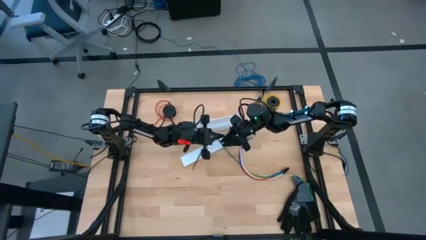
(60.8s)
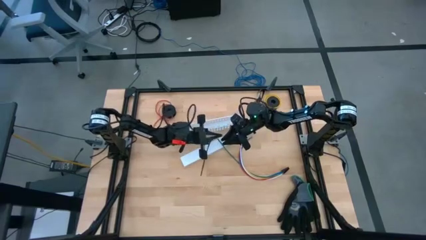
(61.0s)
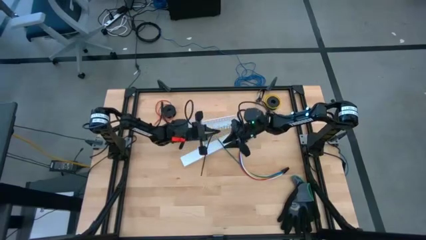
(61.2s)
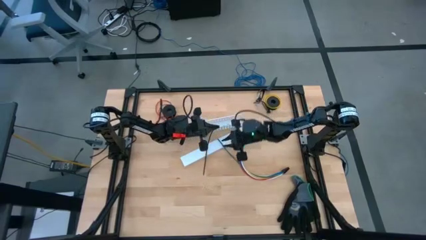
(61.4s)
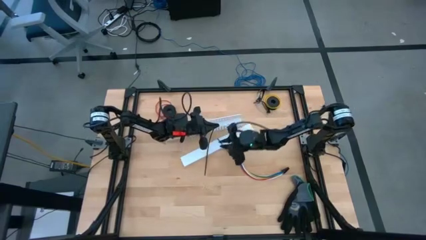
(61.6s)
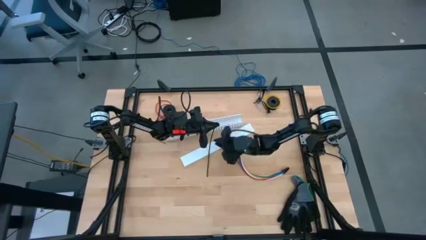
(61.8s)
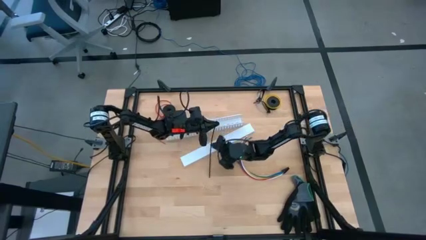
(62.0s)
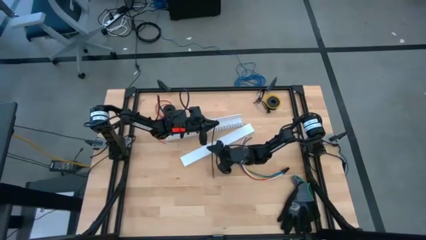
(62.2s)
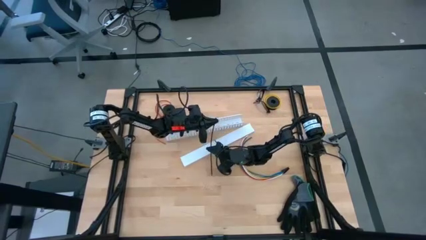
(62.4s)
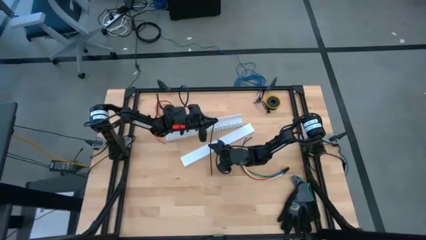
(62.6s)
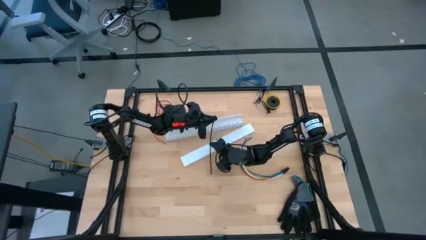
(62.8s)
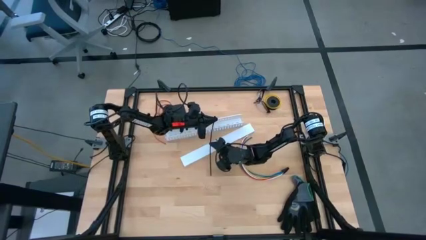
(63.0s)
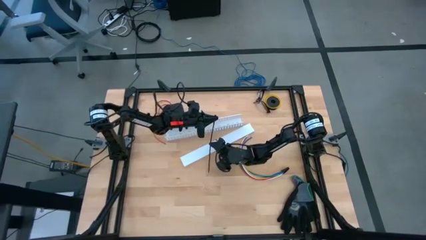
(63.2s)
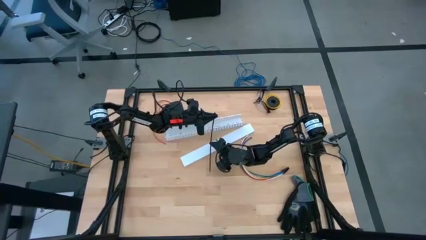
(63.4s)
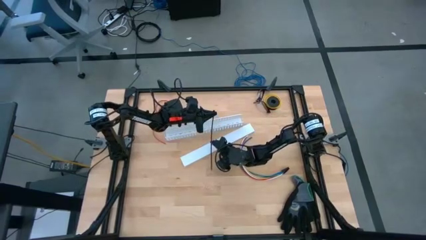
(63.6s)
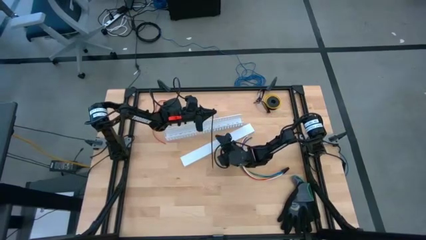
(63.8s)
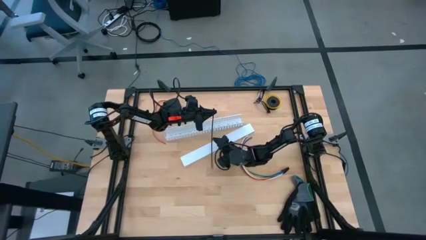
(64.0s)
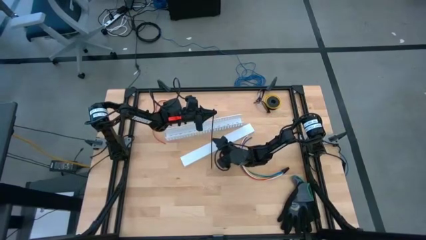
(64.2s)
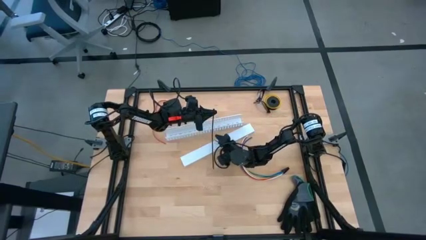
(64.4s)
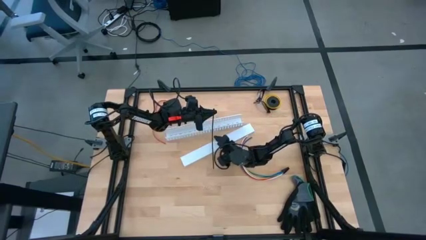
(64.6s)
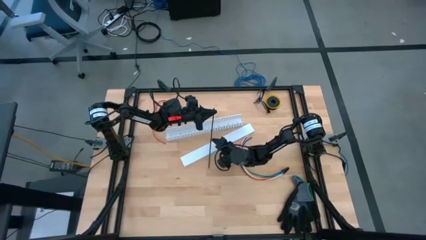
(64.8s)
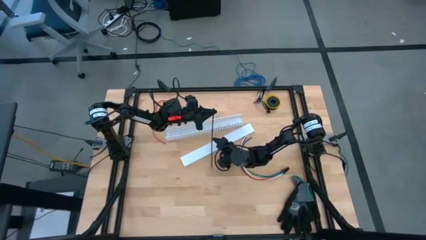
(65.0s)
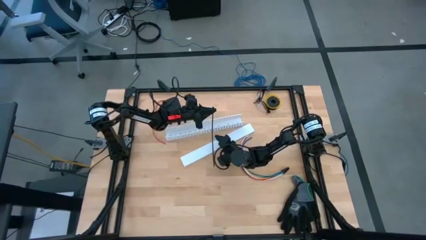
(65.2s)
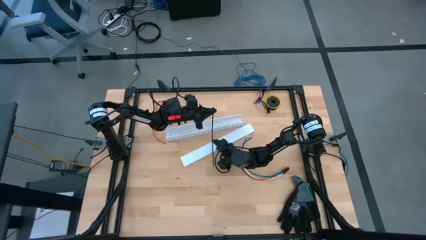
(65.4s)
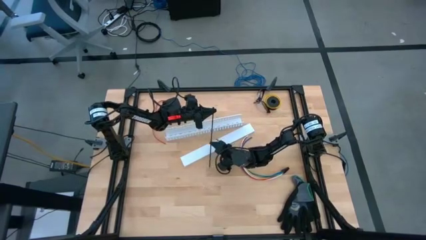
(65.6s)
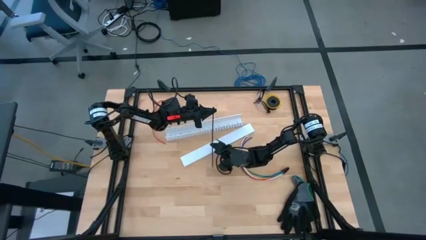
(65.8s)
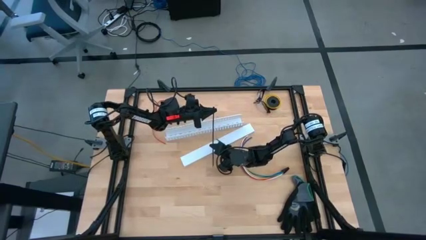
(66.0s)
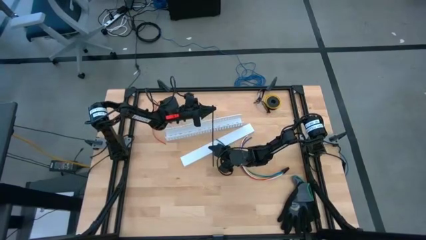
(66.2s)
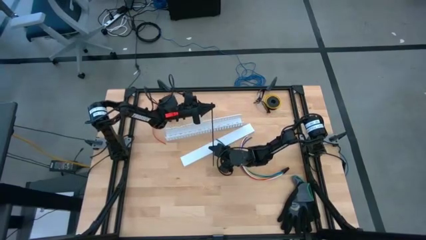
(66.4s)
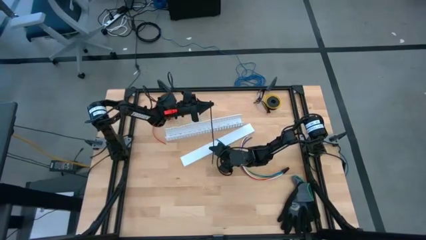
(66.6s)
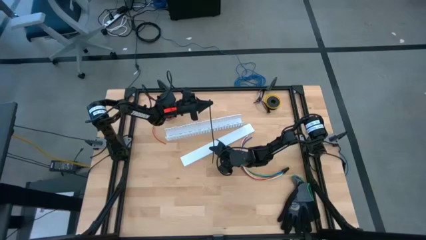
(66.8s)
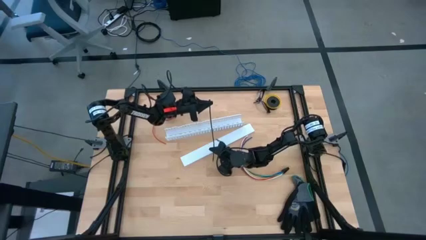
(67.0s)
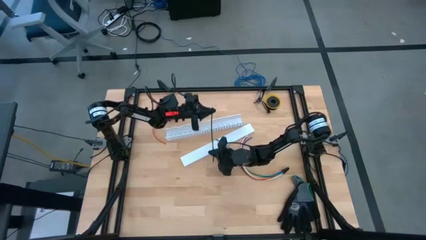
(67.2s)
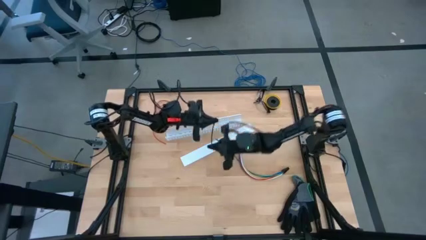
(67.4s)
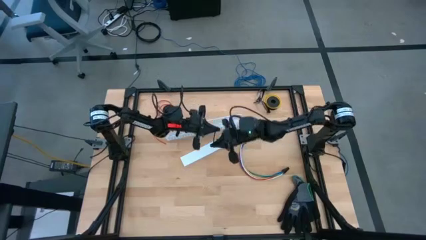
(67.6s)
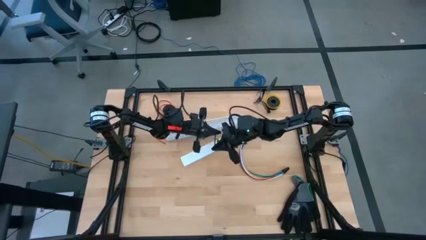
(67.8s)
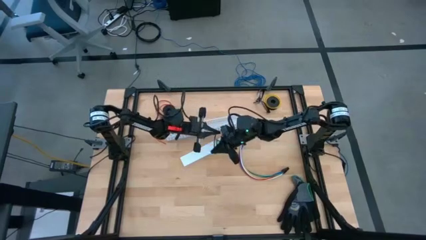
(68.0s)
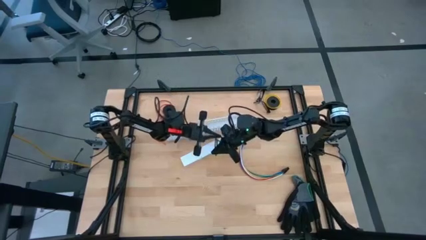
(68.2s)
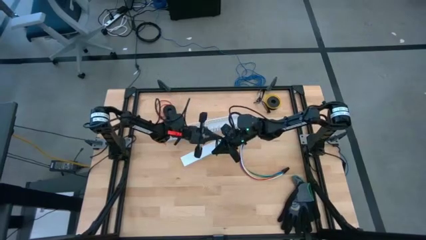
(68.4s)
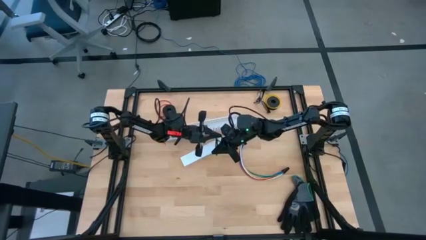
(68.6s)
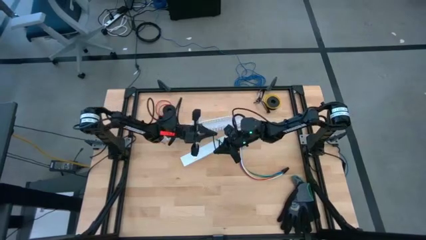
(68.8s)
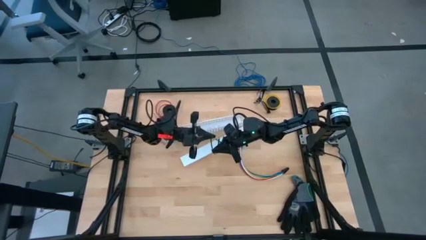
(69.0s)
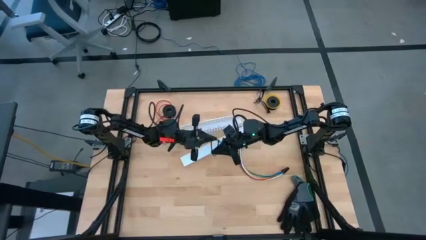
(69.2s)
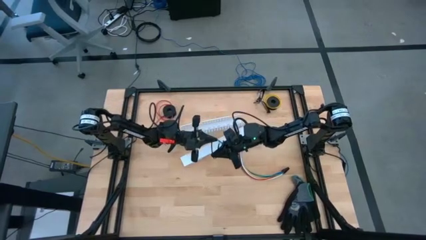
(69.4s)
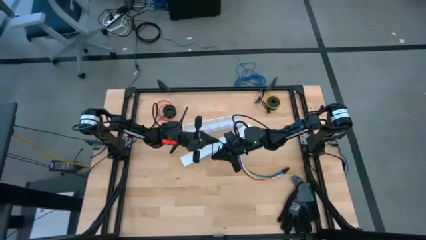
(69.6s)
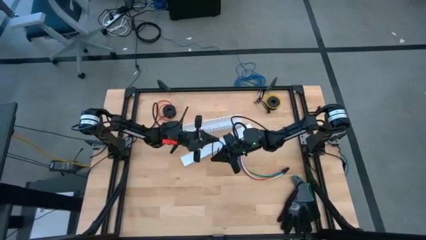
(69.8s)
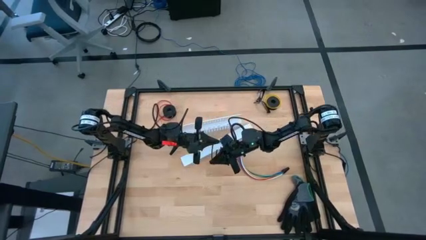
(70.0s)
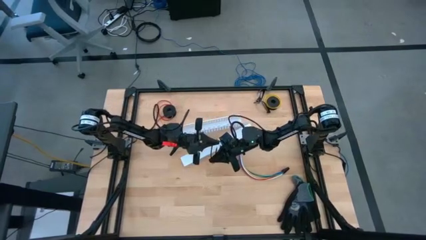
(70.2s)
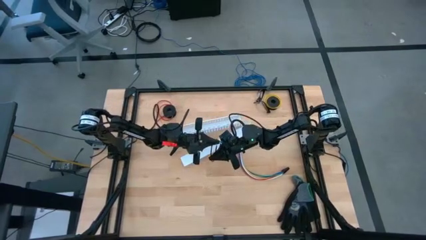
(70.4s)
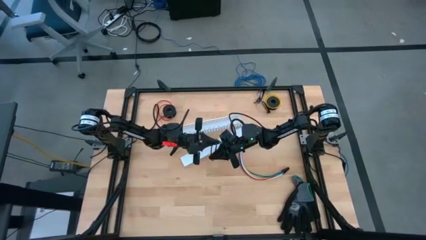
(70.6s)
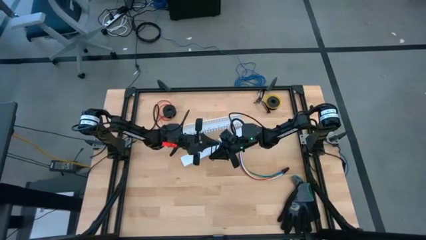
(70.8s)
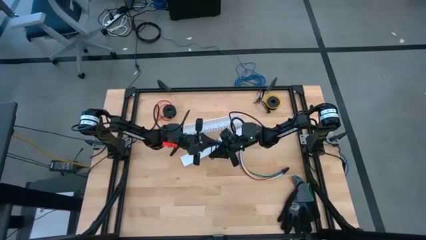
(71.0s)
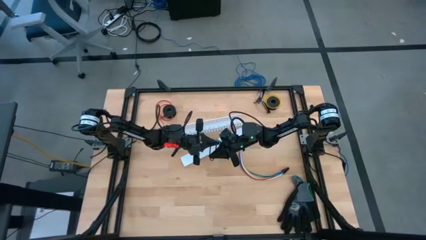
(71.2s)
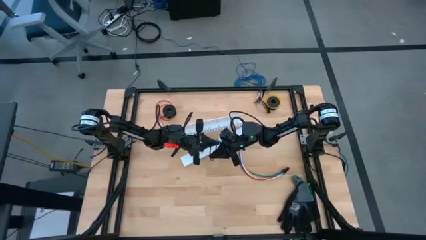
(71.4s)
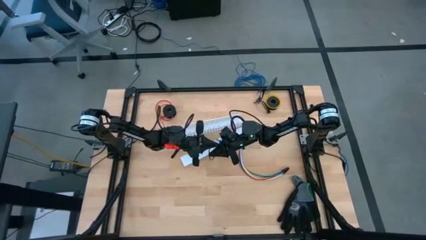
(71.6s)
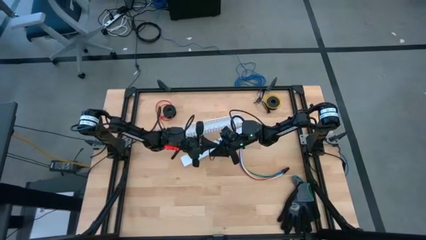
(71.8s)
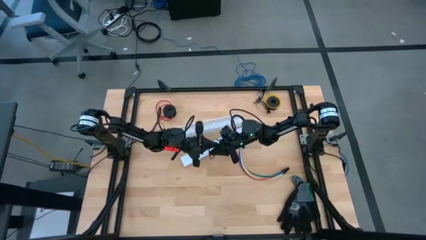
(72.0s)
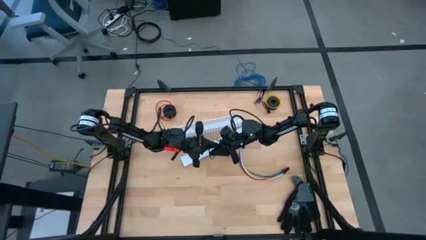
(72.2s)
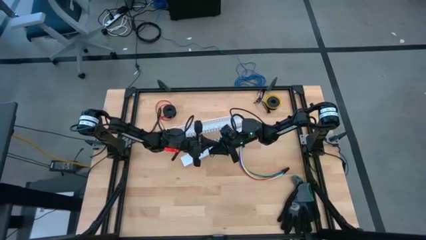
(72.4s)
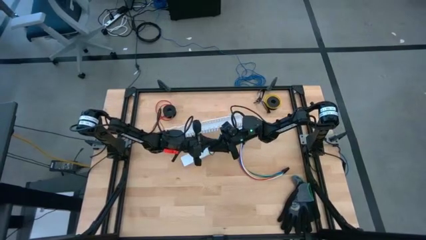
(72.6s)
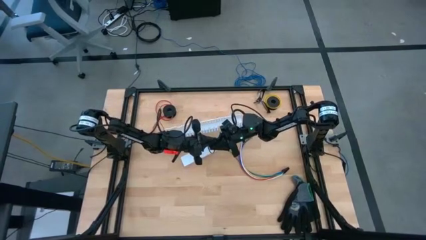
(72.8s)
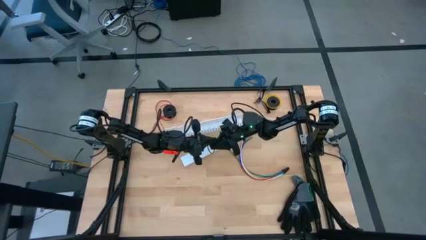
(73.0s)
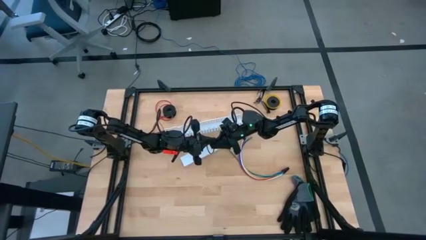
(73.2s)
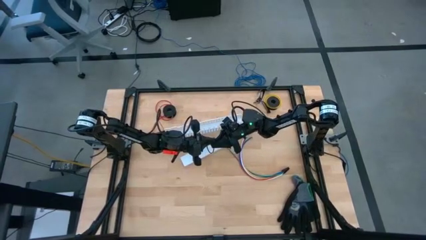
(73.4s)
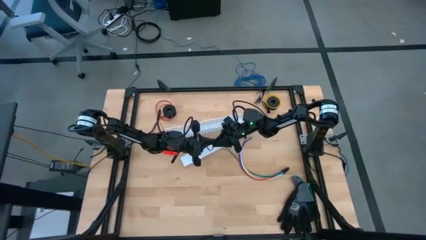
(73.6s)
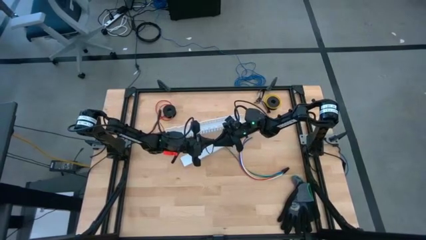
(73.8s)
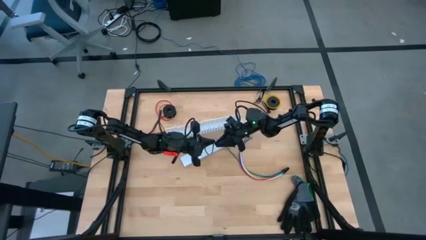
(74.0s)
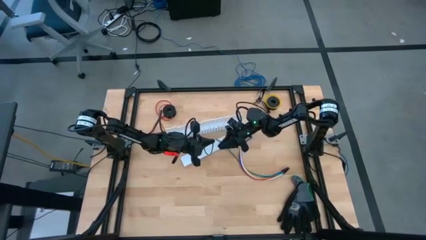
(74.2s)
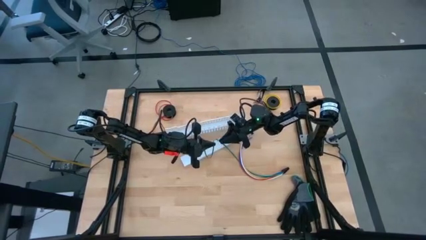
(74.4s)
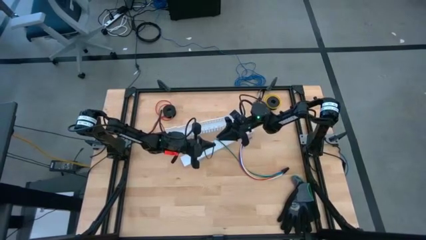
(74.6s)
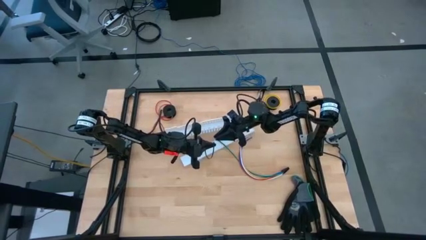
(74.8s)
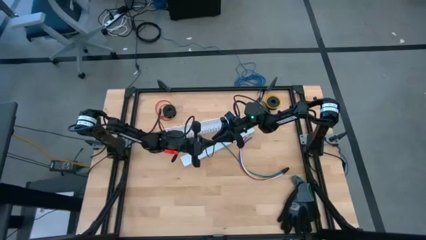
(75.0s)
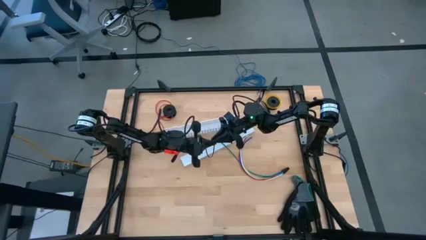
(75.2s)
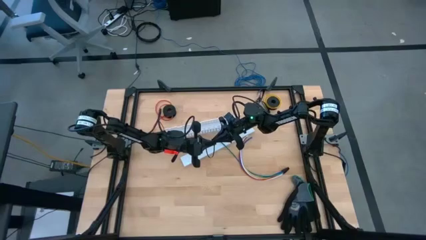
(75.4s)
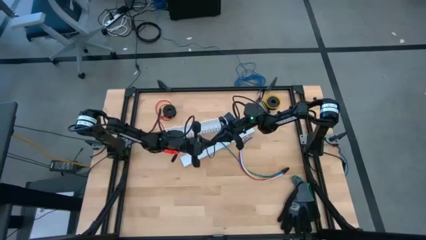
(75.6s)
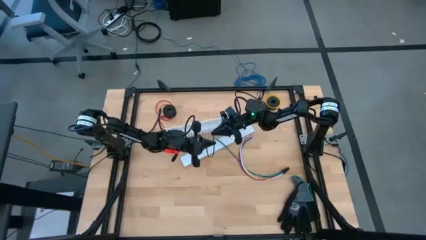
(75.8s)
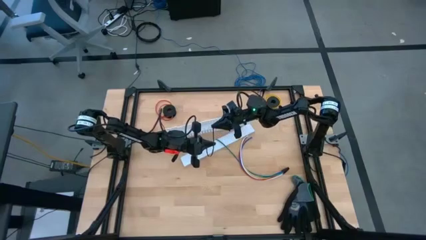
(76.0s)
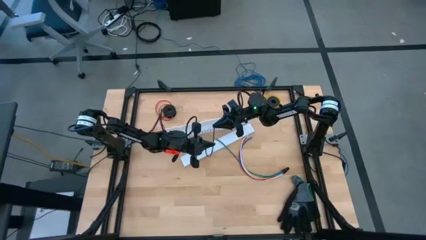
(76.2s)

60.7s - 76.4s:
Task: Ziptie cables
Prepare the black zip tie
